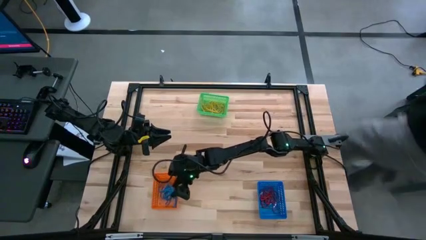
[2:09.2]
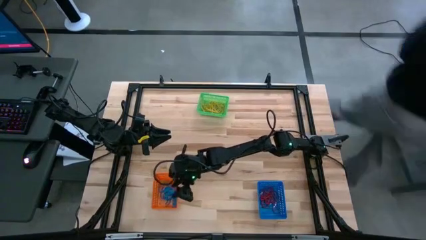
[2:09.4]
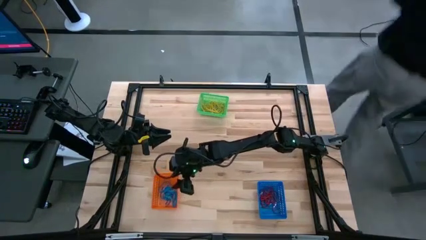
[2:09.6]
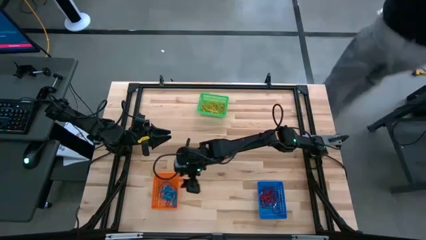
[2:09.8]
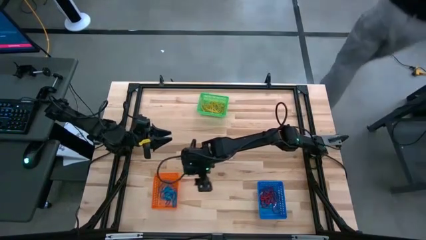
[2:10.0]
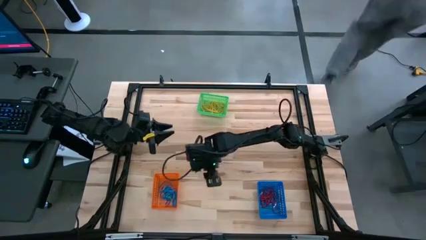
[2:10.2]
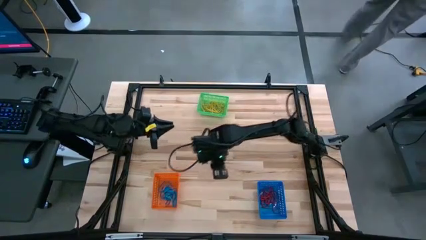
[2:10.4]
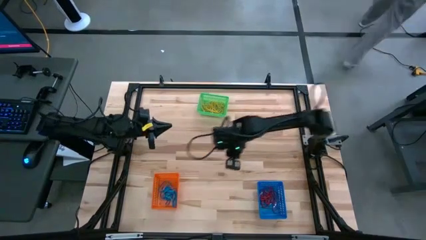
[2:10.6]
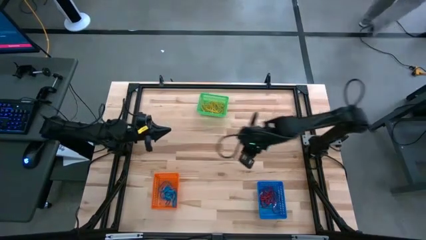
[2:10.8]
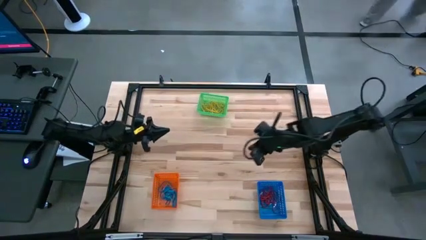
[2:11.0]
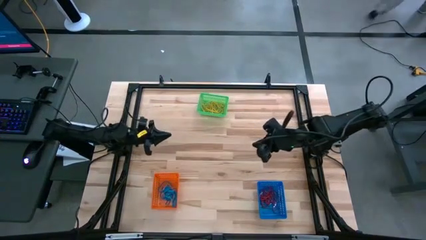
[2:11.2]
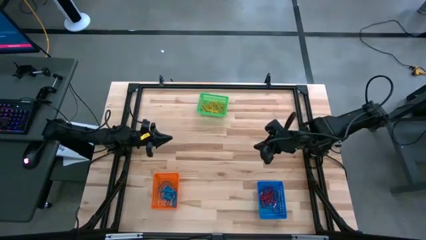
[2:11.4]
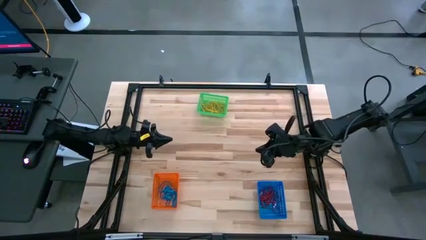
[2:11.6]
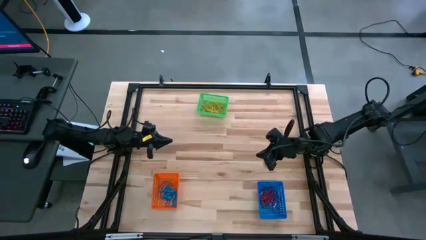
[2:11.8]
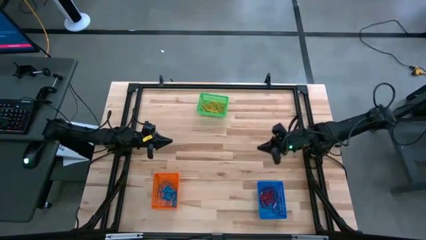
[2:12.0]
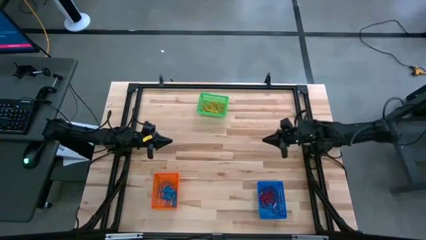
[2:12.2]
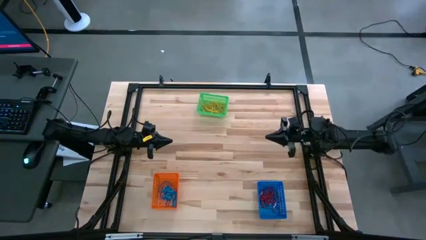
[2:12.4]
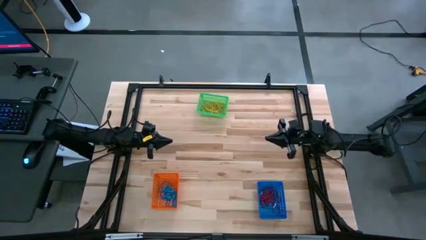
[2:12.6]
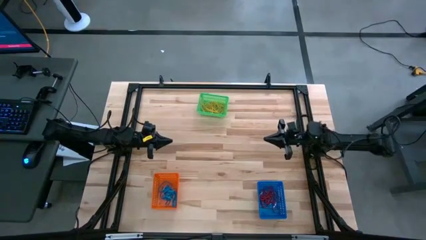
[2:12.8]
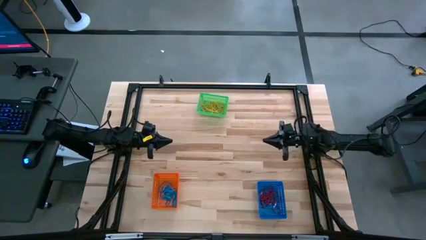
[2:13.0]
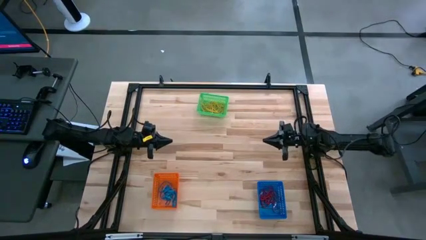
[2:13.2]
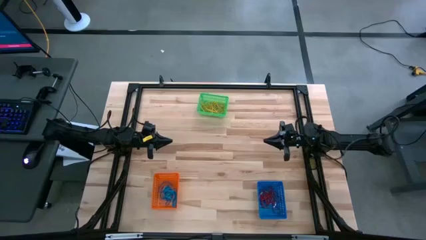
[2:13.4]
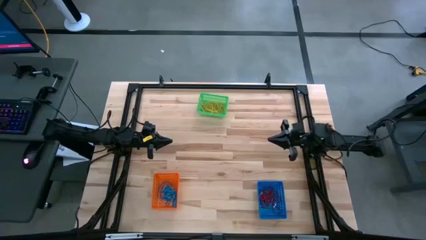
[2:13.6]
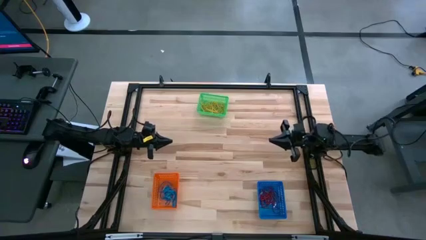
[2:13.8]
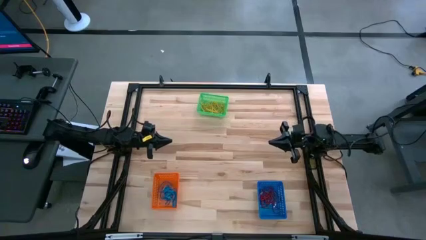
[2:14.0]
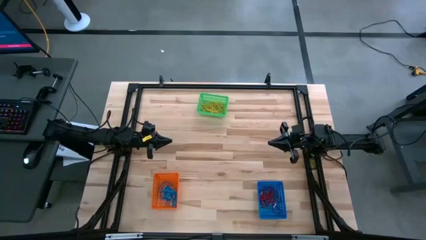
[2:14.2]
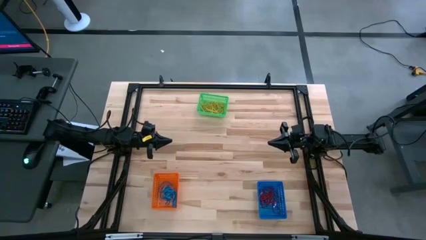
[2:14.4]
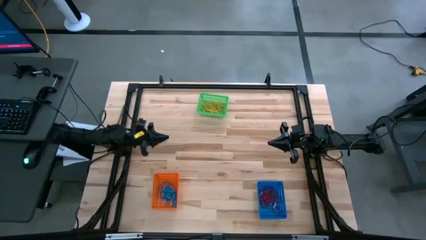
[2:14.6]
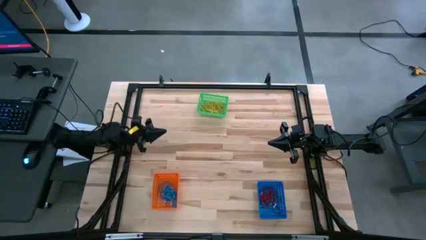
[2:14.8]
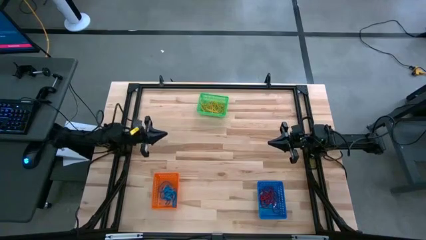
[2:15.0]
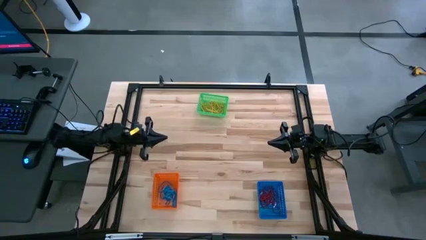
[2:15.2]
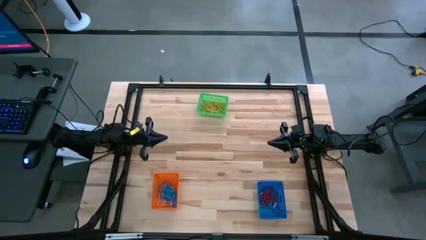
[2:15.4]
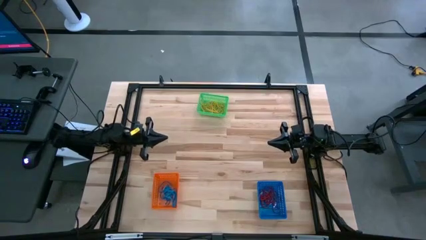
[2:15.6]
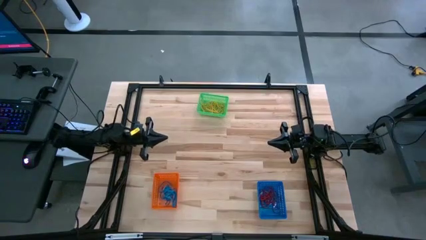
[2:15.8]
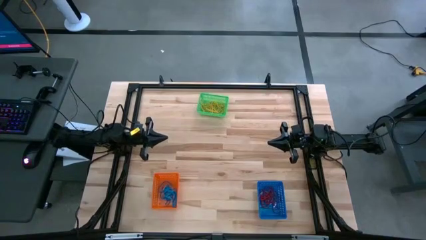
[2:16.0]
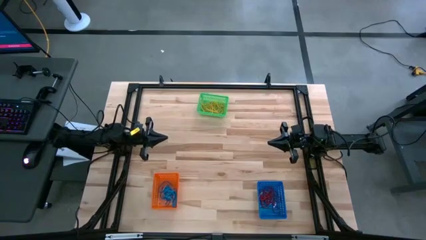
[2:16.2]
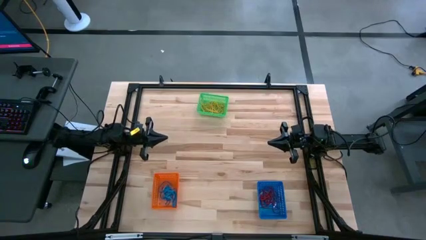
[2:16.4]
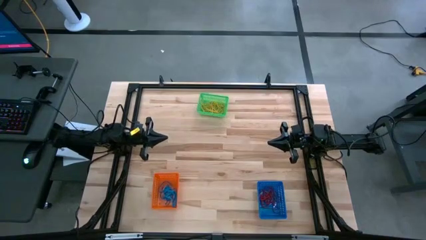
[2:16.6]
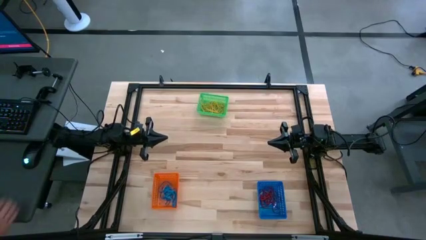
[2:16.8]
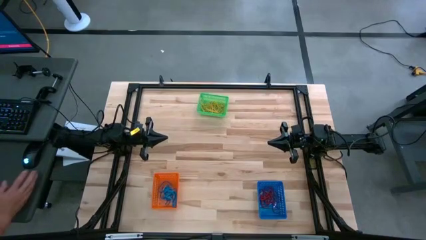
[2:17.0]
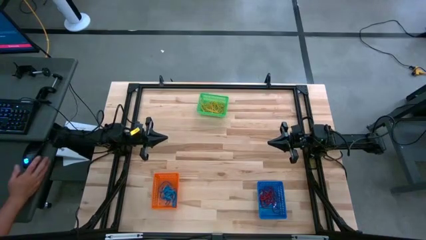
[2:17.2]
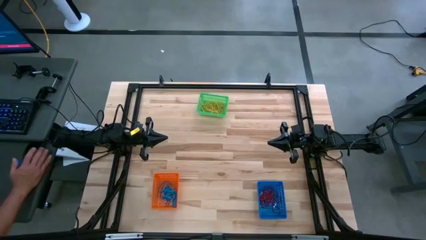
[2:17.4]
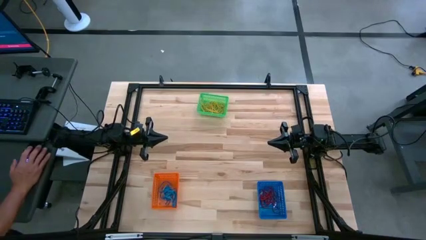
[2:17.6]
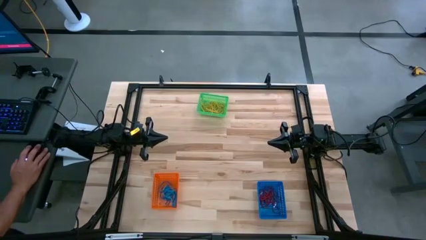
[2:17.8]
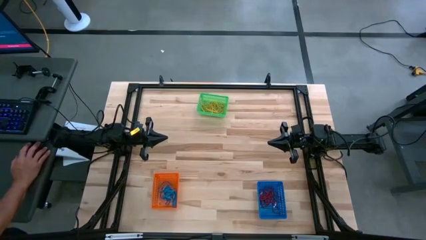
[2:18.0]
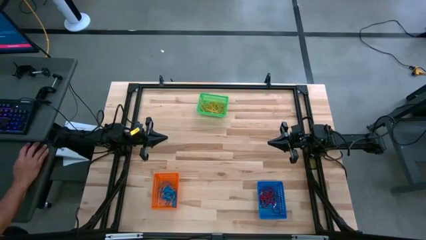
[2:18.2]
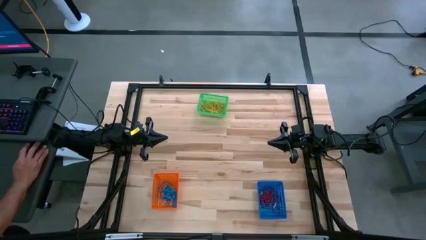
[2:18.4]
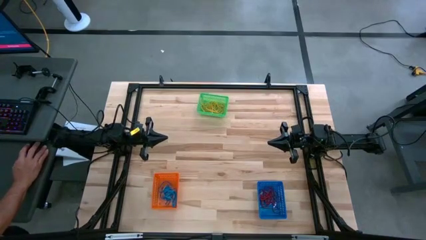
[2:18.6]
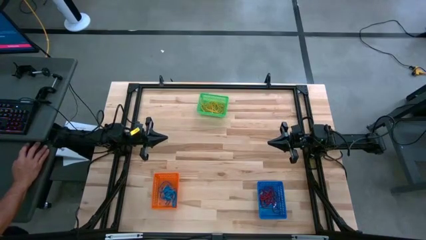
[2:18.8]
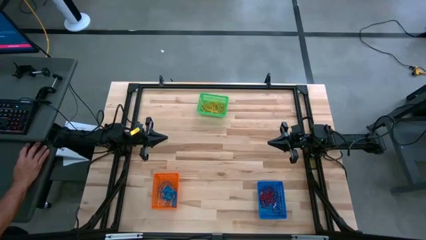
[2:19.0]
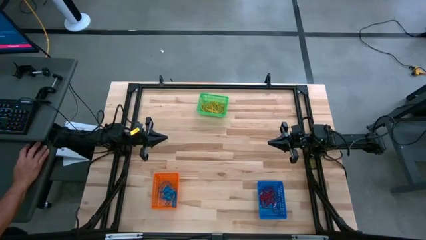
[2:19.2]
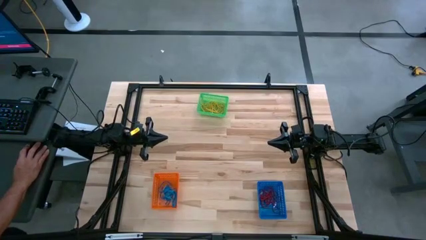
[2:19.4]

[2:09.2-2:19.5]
Task: Sort rubber bands into baskets
Return to Home Position

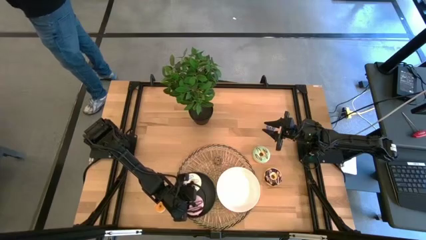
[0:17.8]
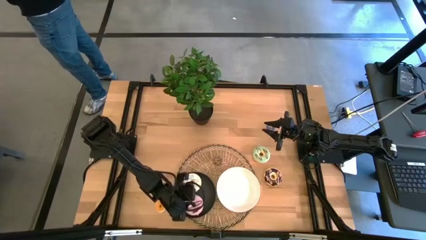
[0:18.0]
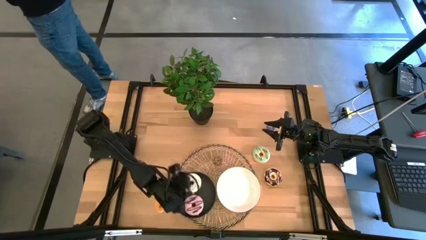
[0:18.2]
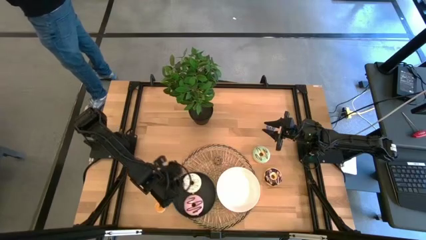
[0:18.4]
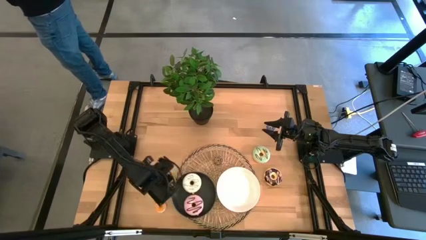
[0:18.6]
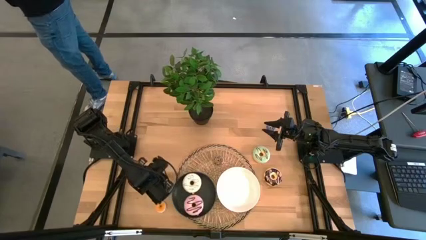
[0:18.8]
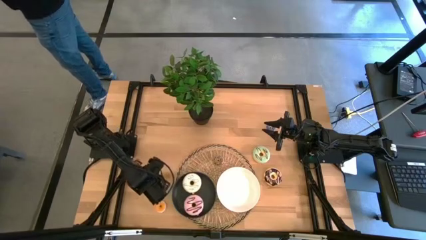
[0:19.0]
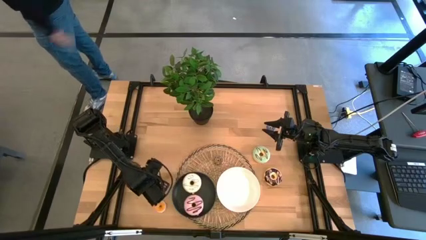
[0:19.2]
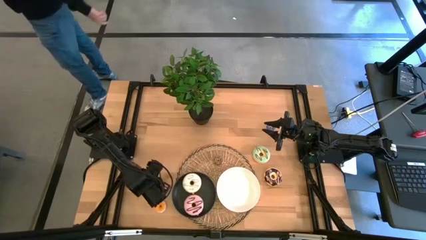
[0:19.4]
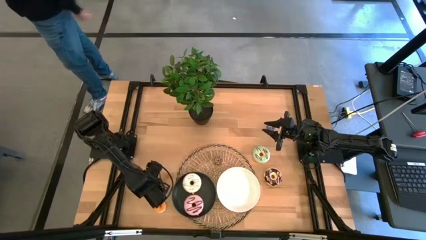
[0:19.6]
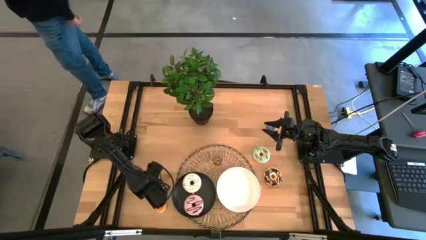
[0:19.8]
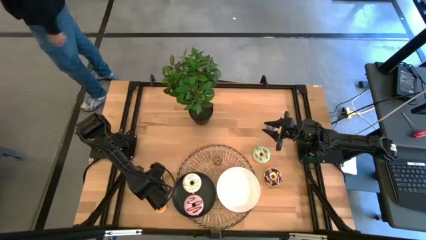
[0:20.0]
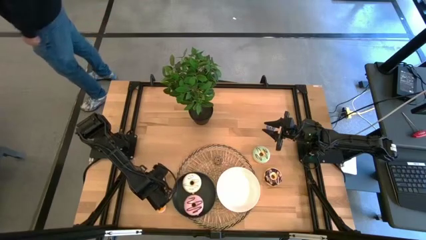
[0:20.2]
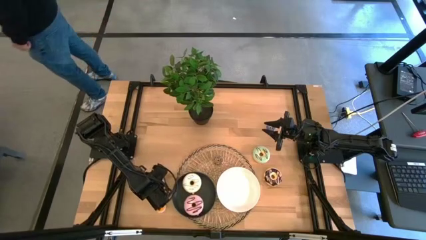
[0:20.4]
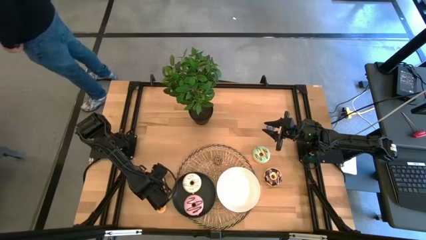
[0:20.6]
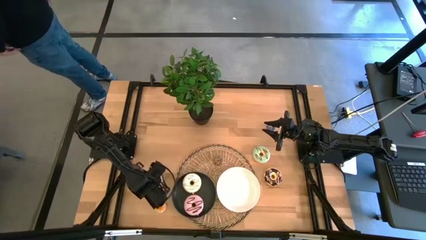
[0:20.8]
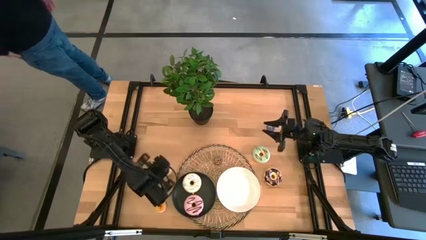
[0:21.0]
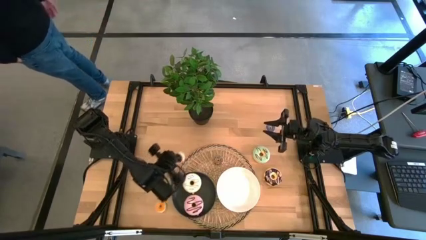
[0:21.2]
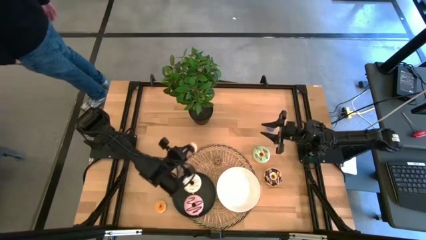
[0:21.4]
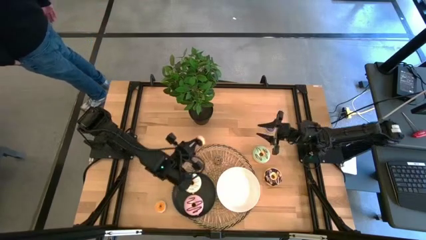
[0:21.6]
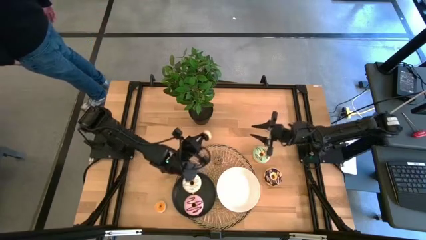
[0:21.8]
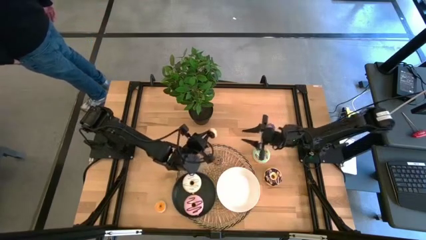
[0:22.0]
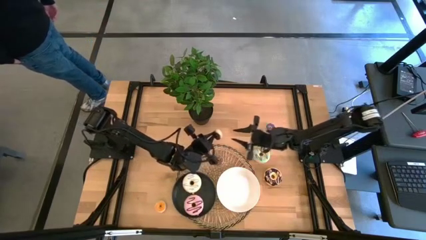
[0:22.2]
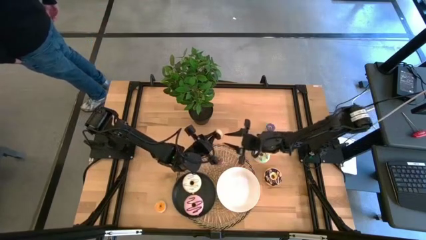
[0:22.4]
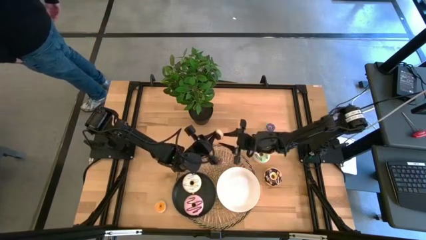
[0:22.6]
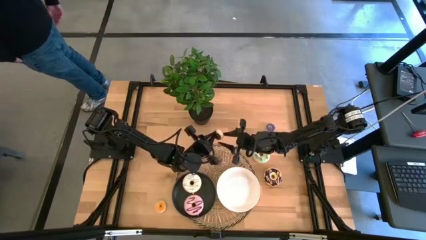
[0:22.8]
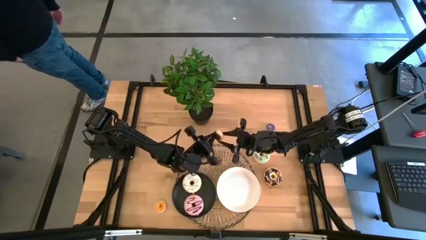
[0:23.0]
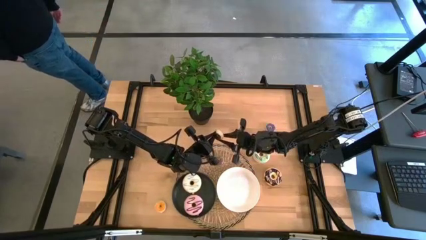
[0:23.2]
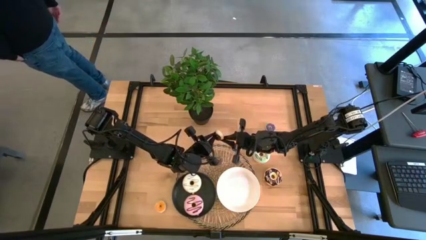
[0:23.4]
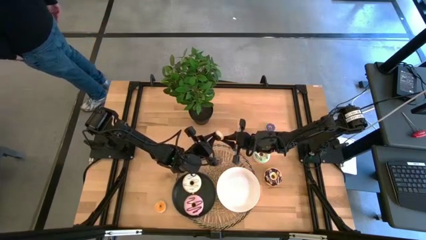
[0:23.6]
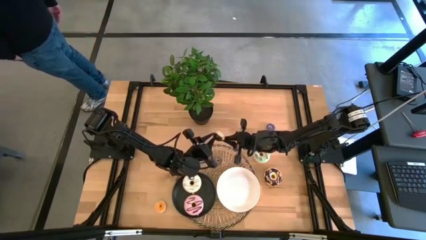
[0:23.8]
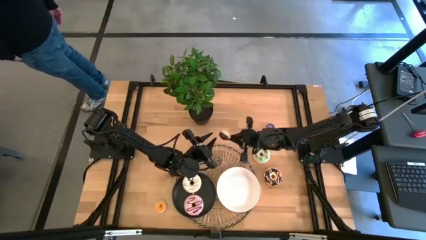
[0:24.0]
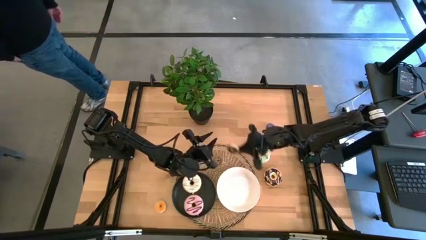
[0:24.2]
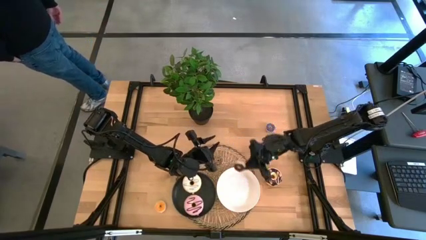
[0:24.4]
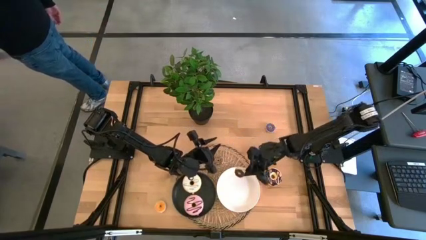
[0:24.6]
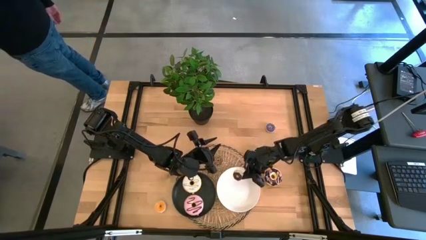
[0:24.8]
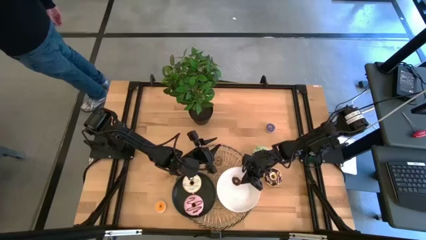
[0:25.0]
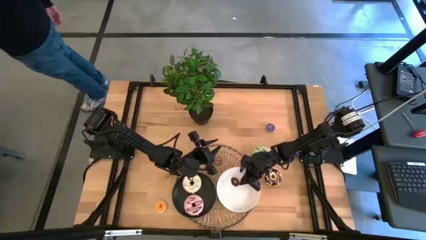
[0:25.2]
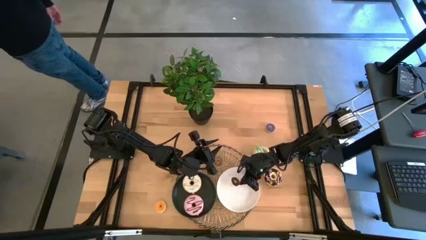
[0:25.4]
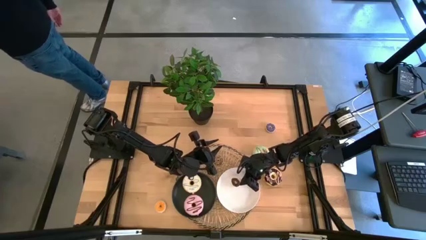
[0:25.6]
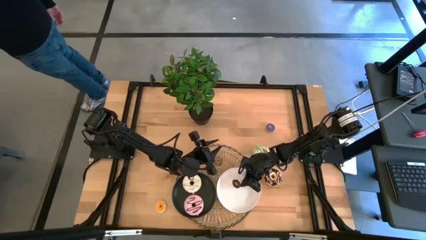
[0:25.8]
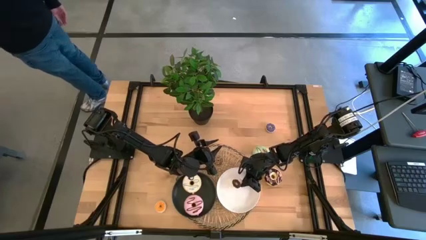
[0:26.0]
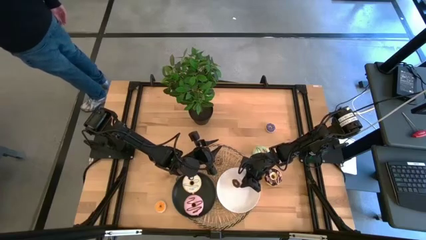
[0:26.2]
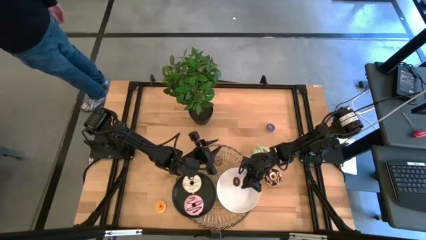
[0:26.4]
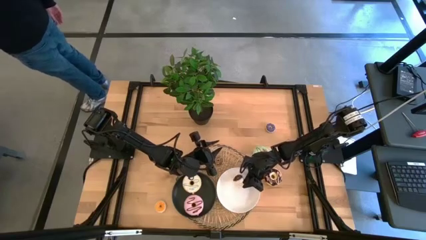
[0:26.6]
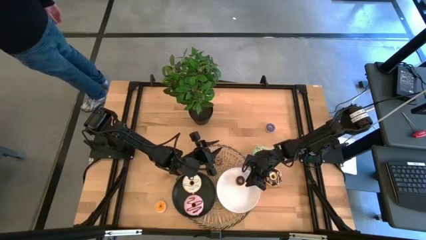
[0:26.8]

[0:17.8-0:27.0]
Task: Pick & Place donuts
Put the small black donut on the white plate
